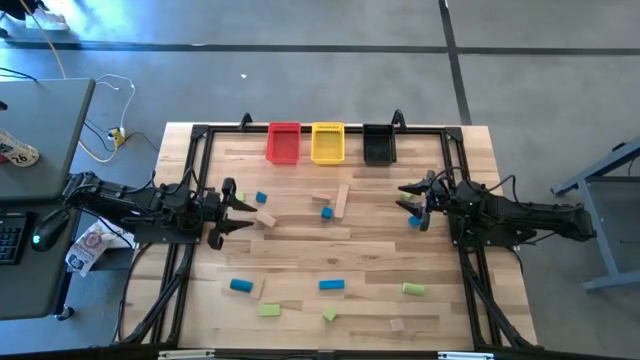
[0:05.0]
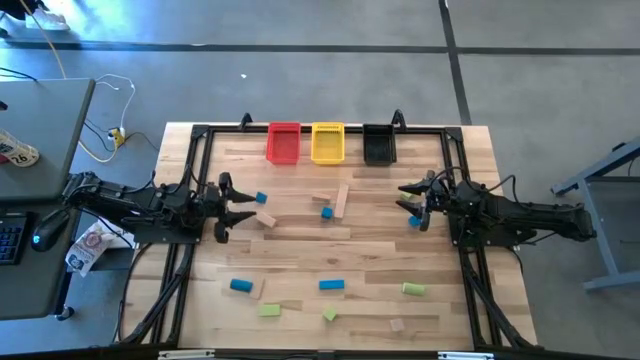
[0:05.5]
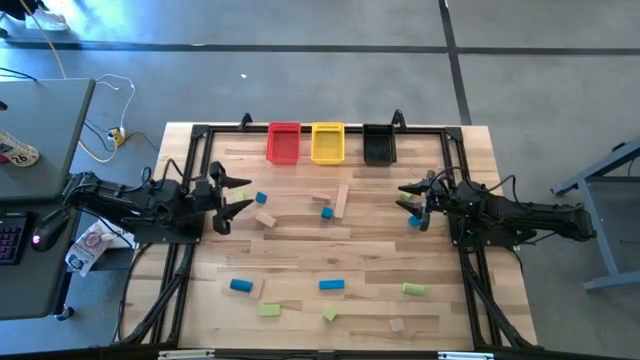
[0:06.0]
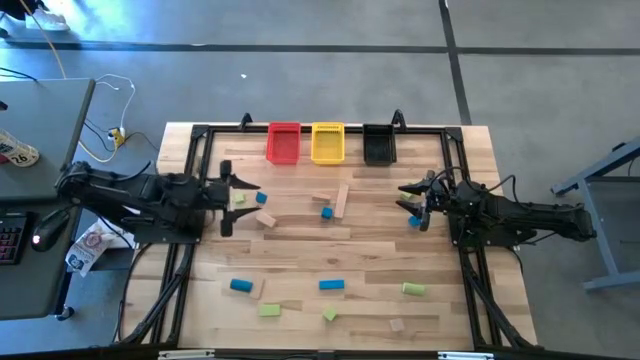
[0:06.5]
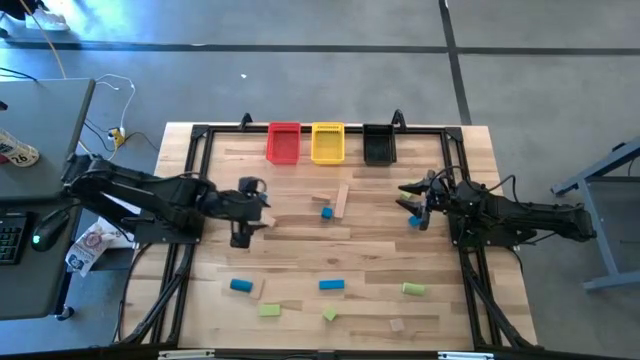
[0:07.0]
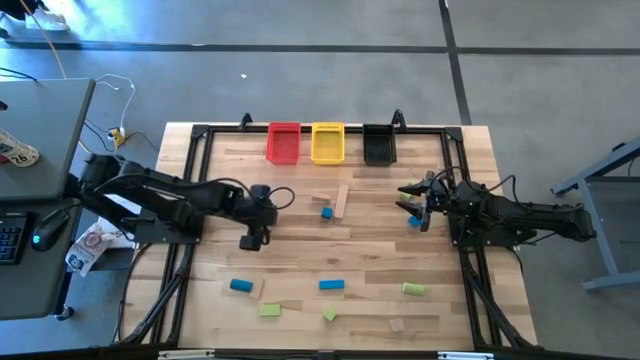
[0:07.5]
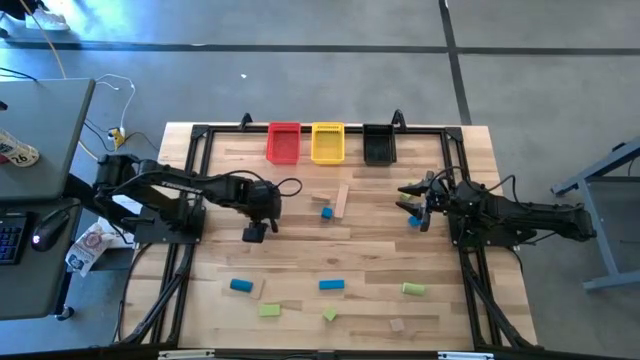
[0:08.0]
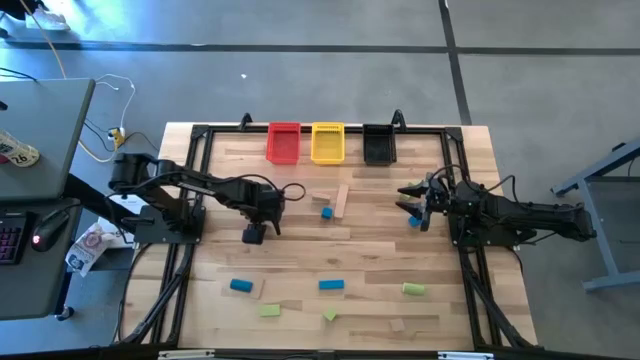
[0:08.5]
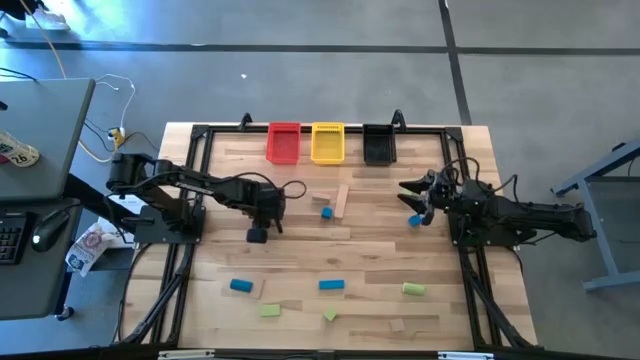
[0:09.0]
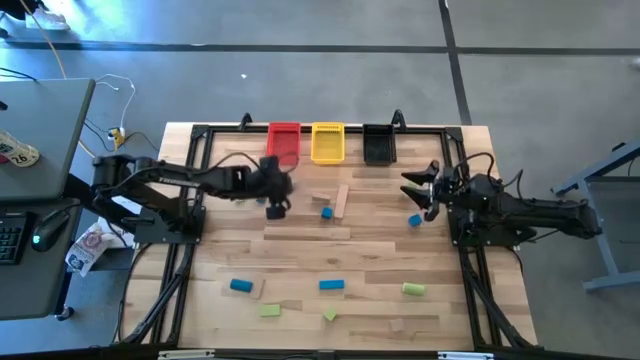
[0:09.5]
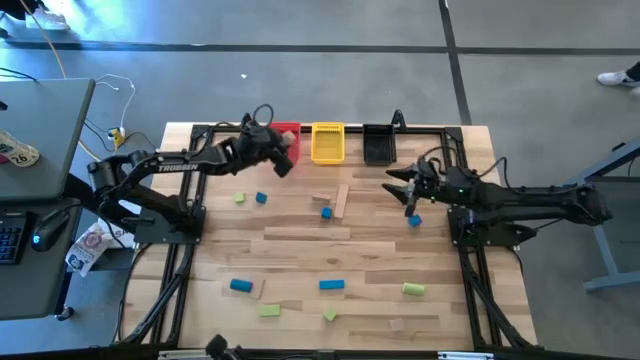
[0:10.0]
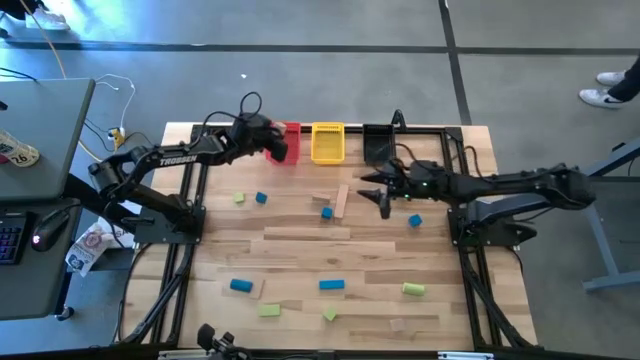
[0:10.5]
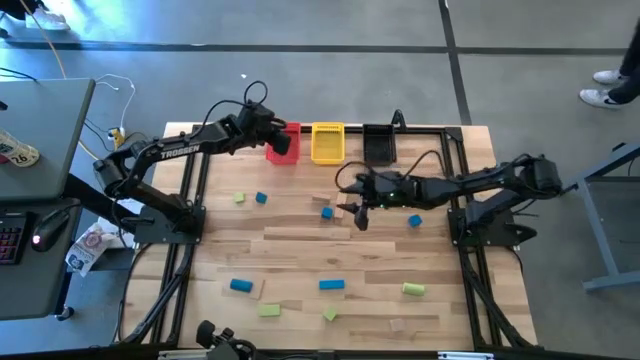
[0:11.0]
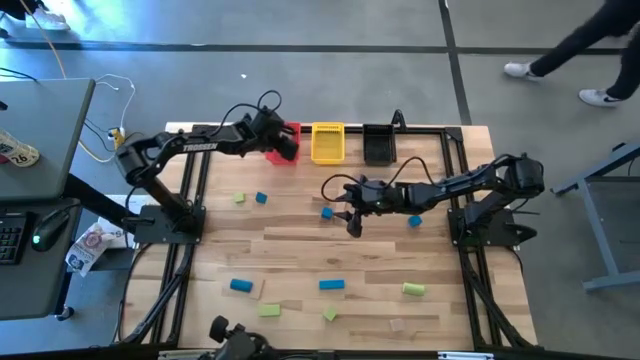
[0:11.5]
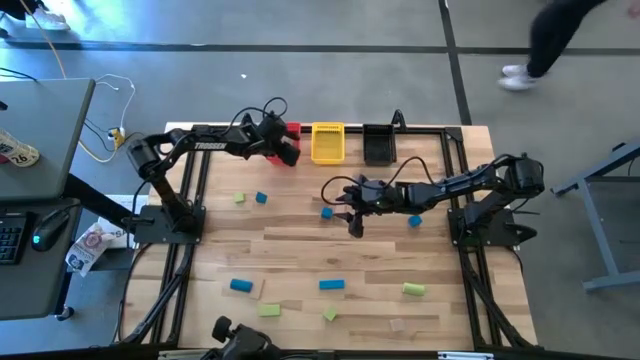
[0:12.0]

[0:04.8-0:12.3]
Task: Sort & place blocks by color
Put the brown block into the red basket

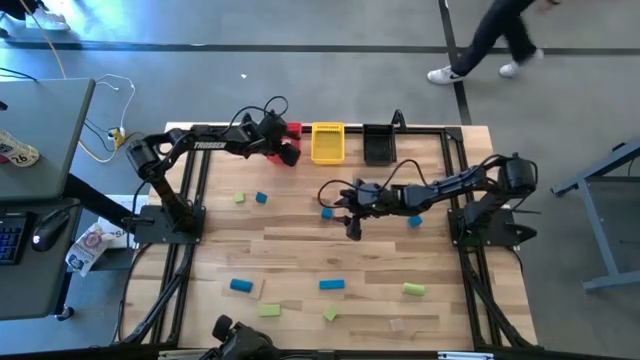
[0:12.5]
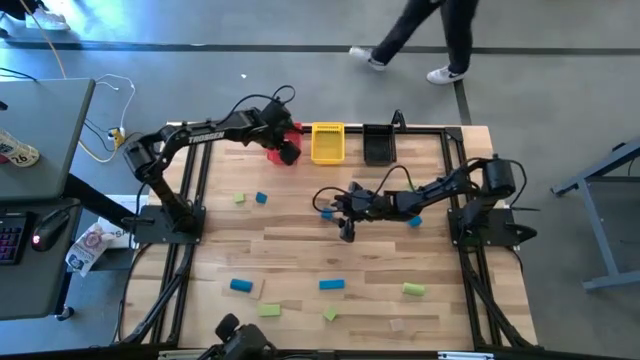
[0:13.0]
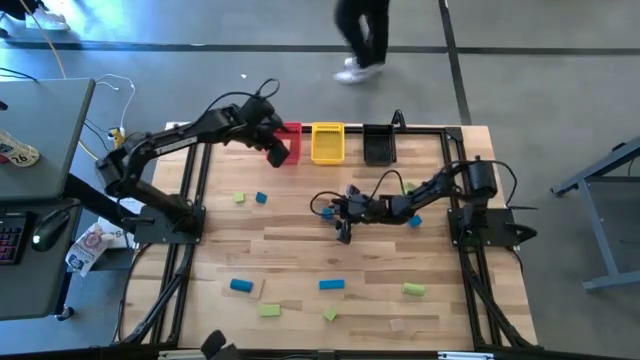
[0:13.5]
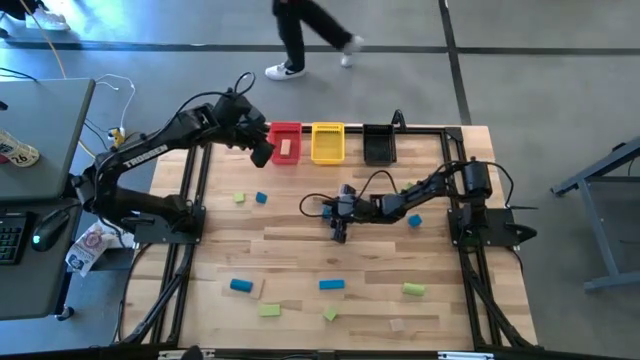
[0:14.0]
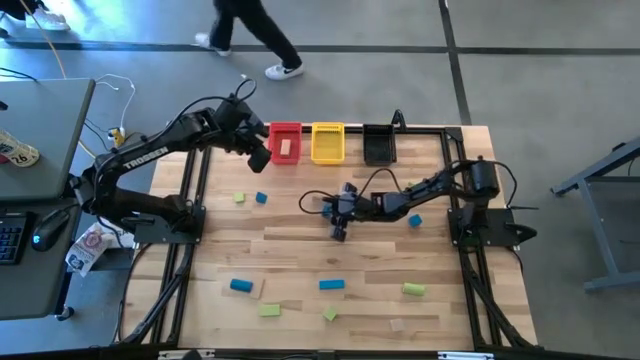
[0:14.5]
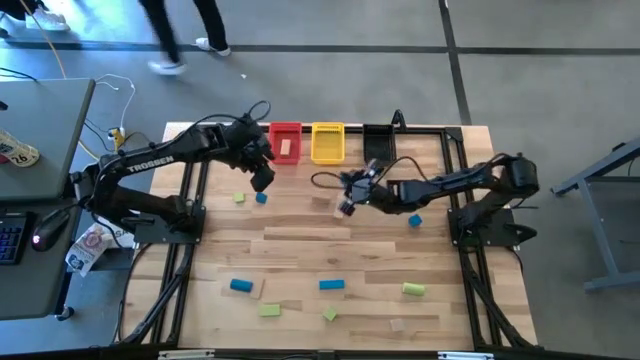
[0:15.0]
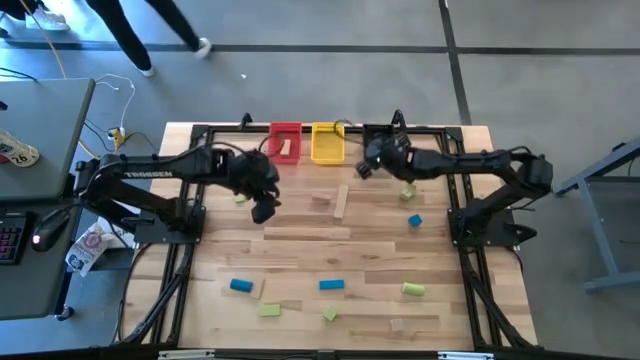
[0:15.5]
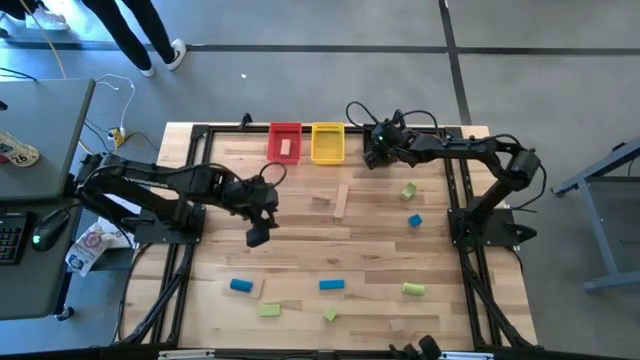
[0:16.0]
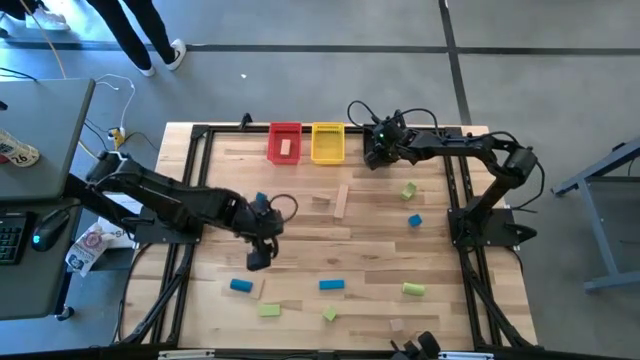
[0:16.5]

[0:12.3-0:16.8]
Put the blue block into the black basket

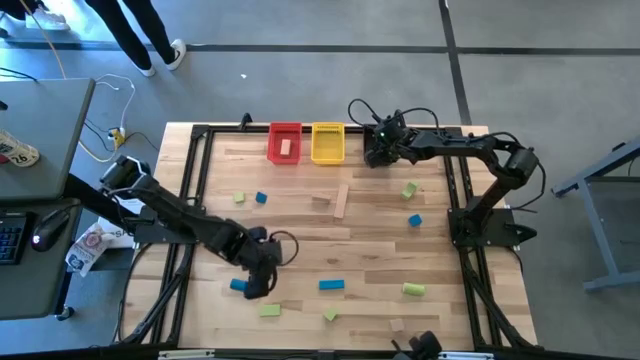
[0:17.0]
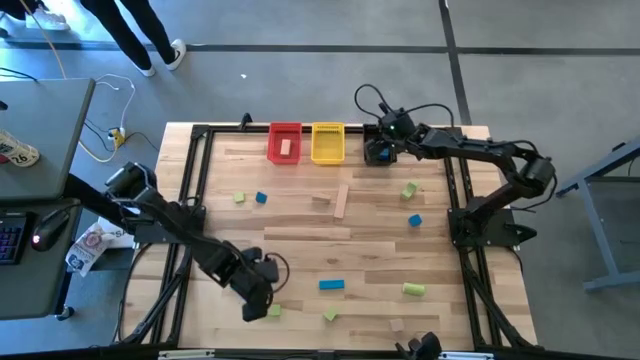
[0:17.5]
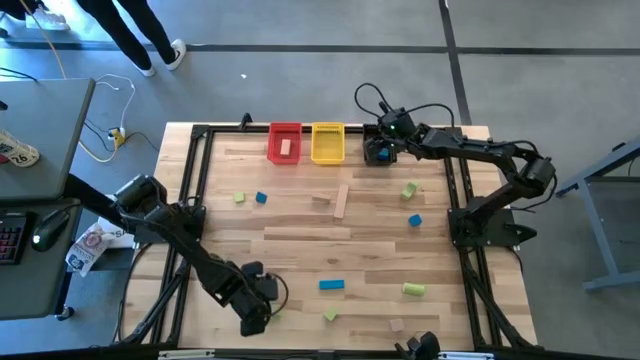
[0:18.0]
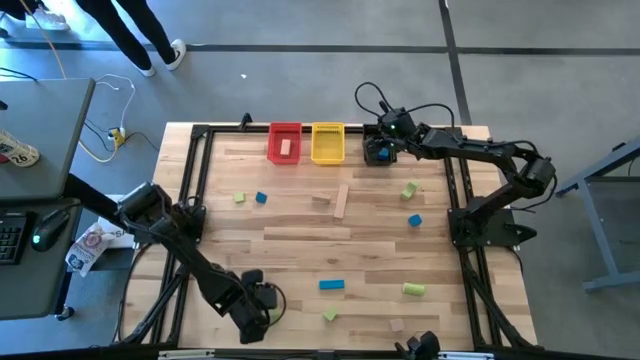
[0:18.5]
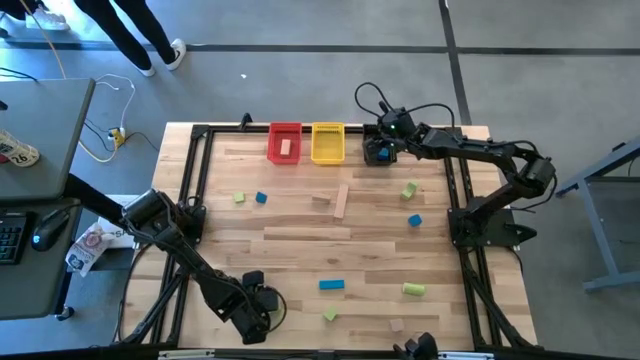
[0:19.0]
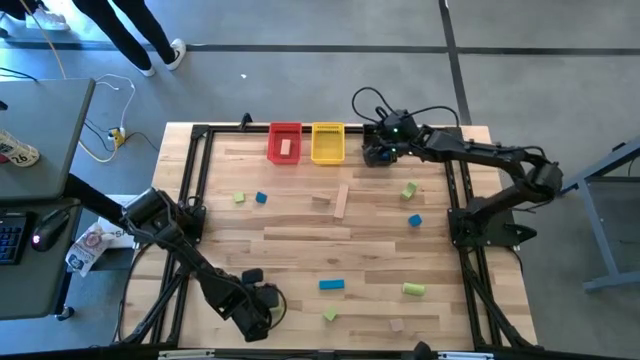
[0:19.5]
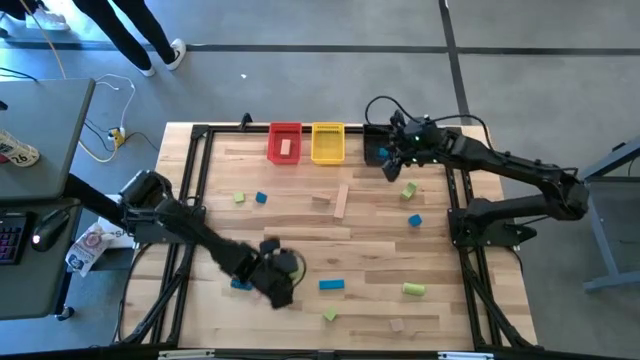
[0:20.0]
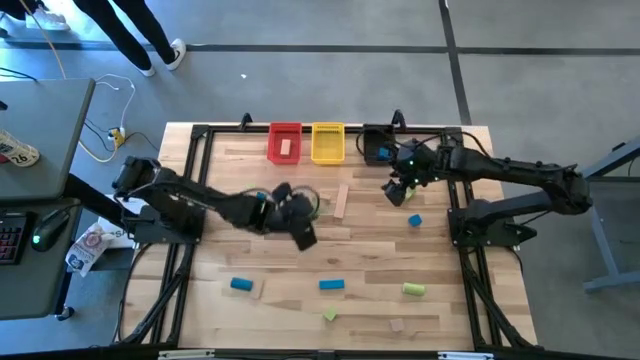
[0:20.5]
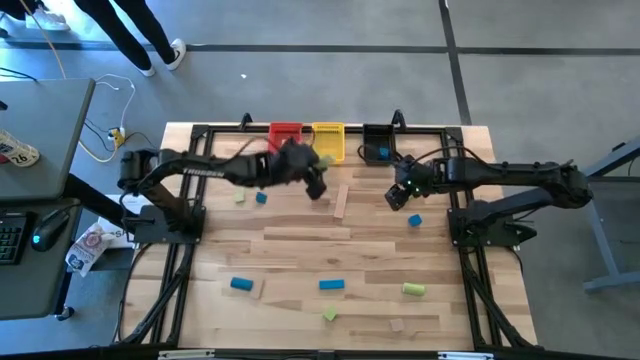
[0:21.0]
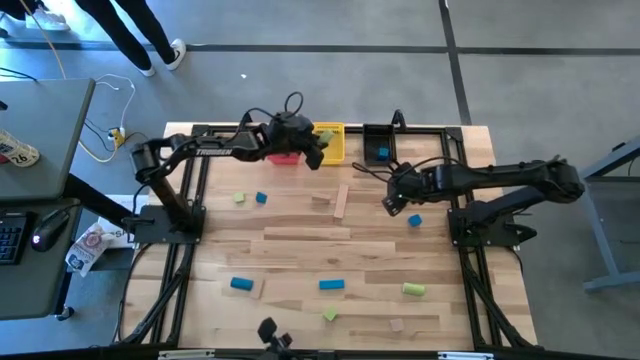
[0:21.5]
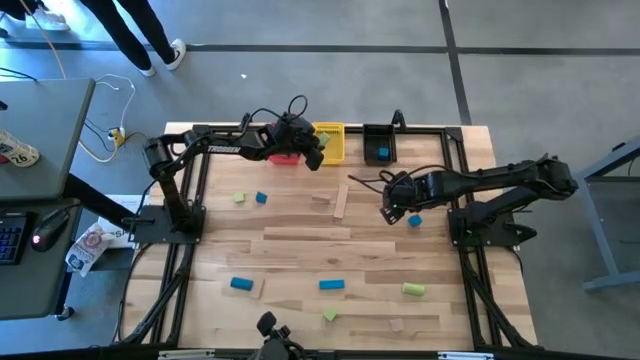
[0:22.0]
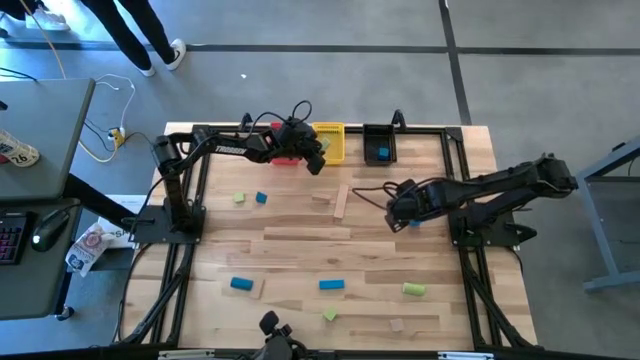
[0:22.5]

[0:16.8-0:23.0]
Put the green block into the yellow basket

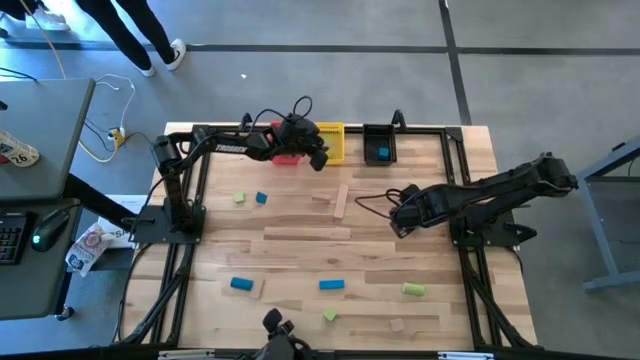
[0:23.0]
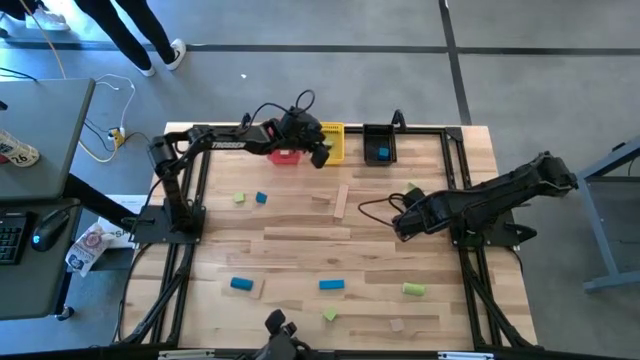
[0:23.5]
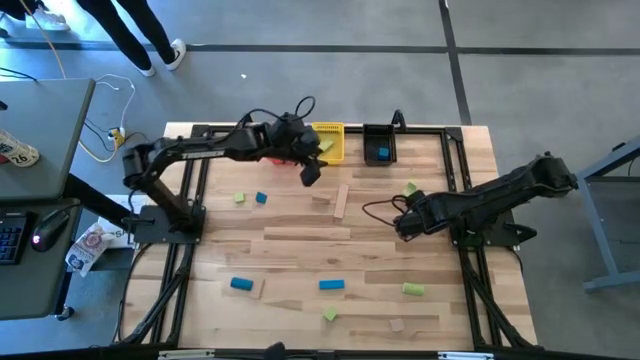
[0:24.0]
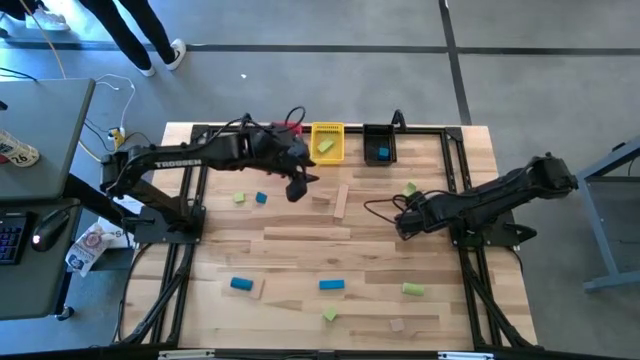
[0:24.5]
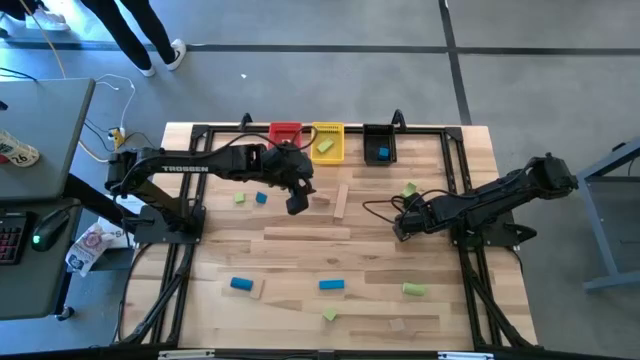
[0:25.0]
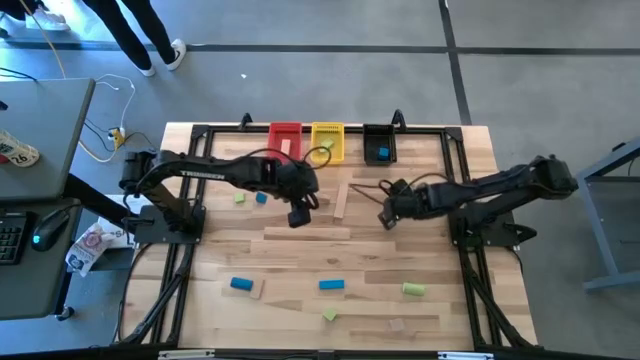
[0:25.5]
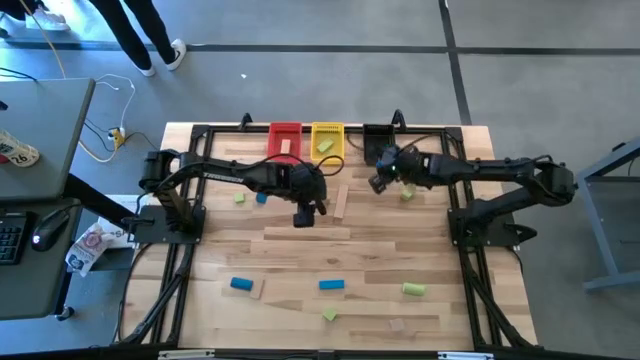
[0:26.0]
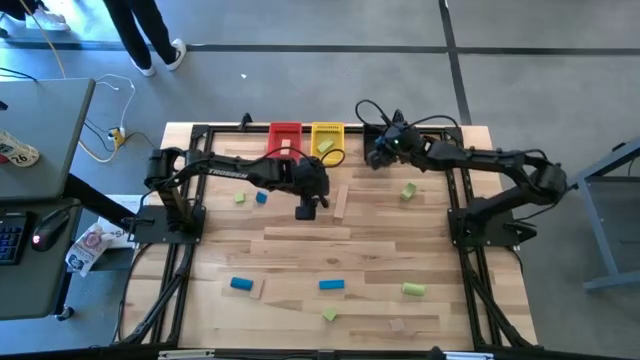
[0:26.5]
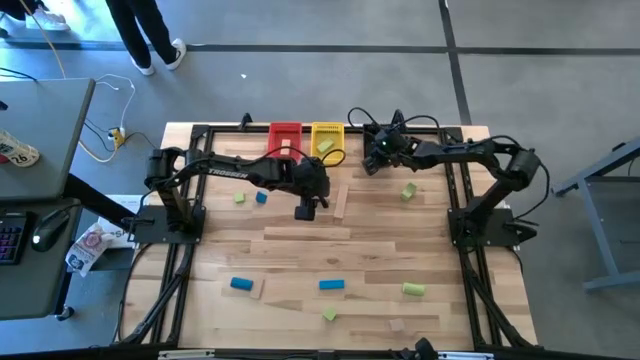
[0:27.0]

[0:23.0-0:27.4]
Put the blue block into the black basket
